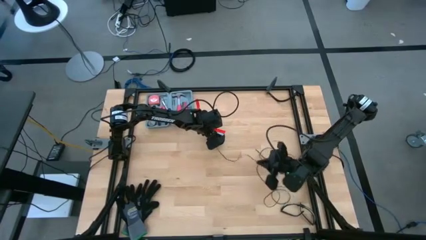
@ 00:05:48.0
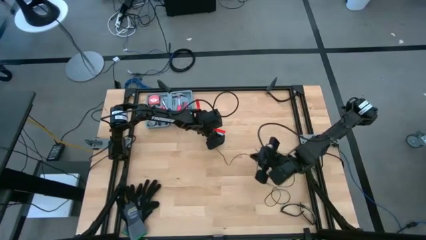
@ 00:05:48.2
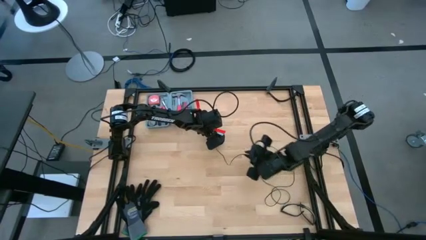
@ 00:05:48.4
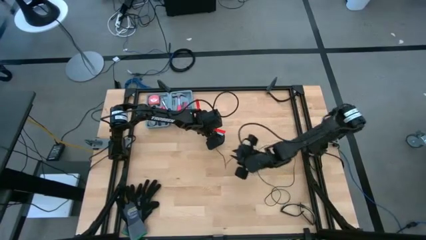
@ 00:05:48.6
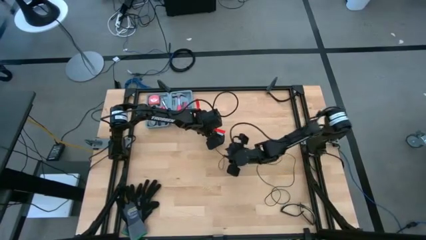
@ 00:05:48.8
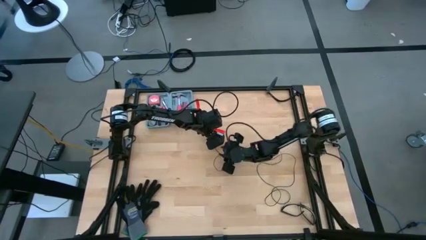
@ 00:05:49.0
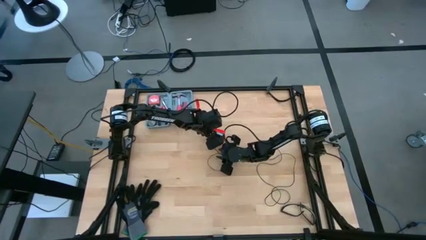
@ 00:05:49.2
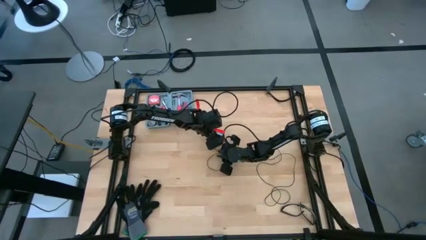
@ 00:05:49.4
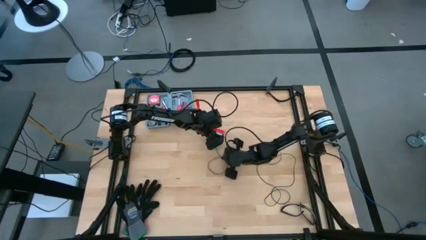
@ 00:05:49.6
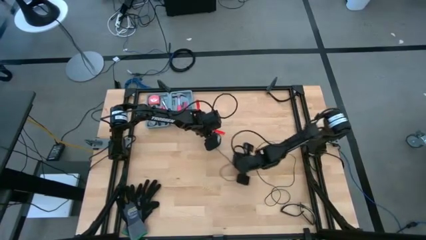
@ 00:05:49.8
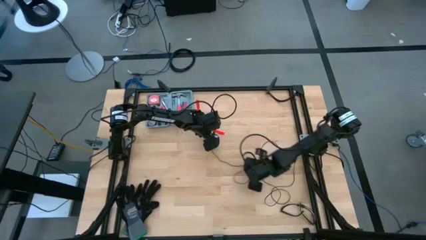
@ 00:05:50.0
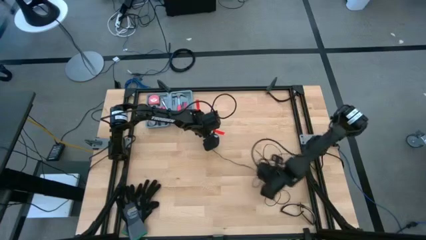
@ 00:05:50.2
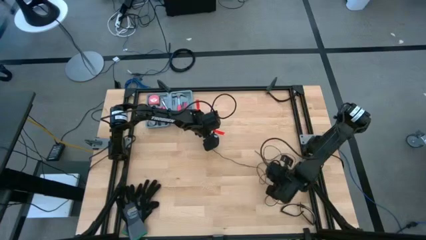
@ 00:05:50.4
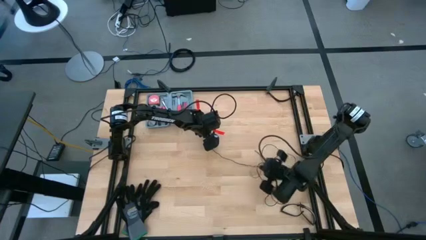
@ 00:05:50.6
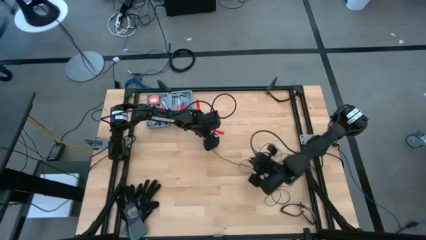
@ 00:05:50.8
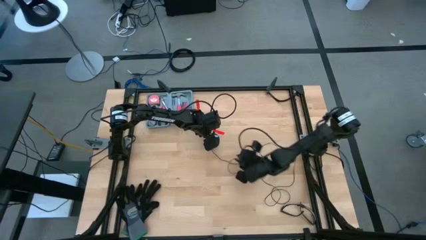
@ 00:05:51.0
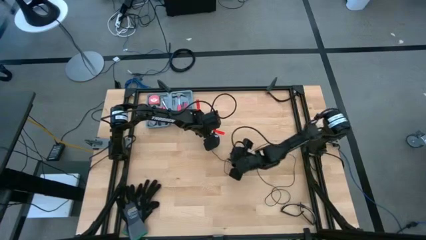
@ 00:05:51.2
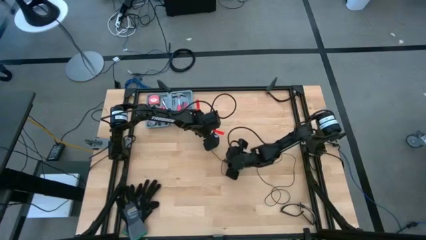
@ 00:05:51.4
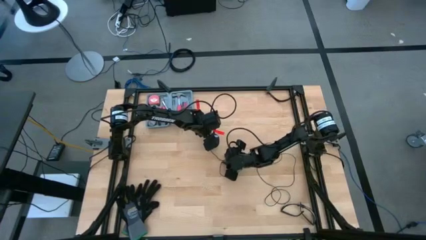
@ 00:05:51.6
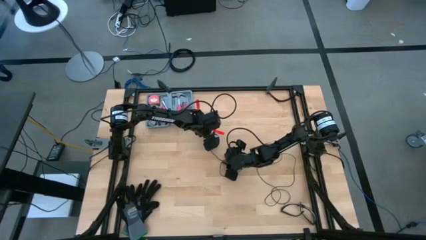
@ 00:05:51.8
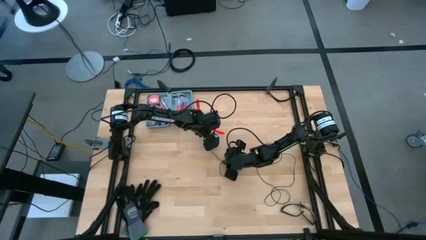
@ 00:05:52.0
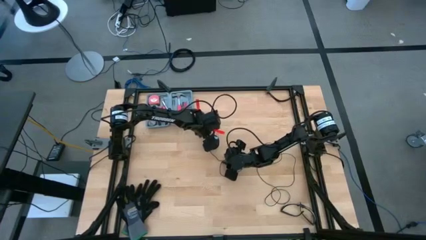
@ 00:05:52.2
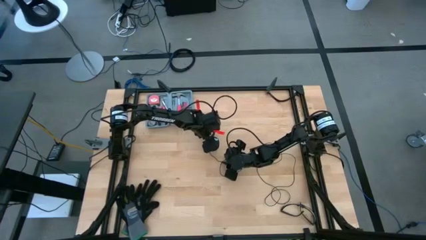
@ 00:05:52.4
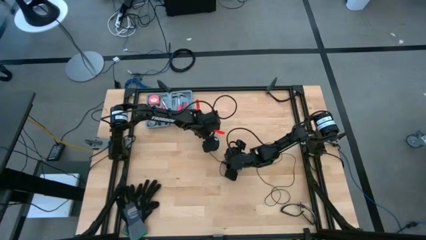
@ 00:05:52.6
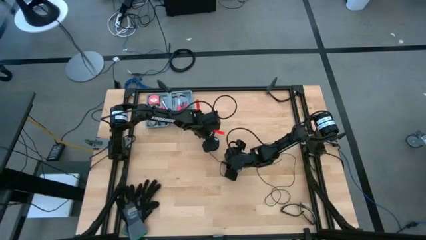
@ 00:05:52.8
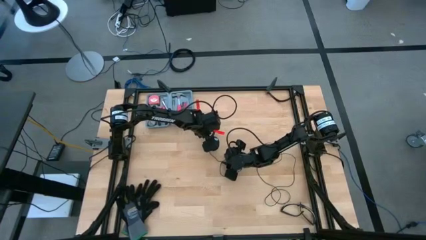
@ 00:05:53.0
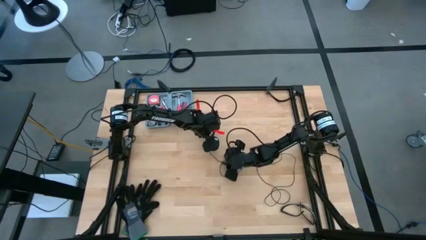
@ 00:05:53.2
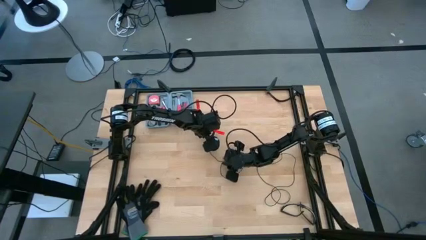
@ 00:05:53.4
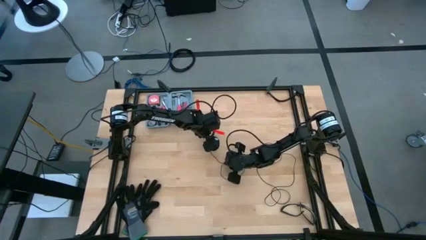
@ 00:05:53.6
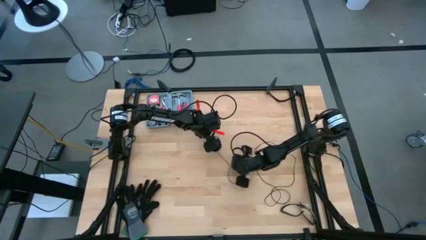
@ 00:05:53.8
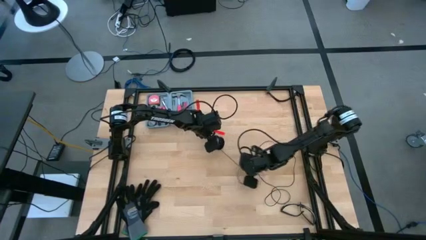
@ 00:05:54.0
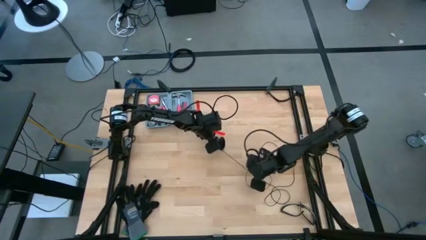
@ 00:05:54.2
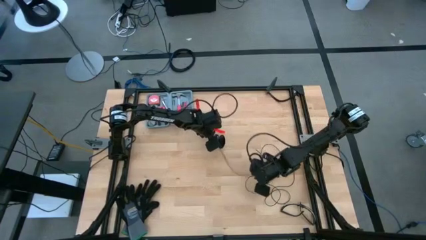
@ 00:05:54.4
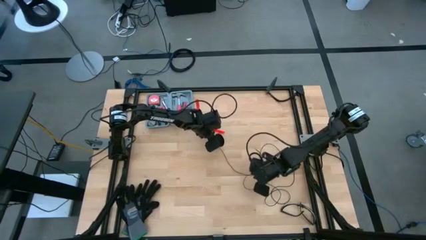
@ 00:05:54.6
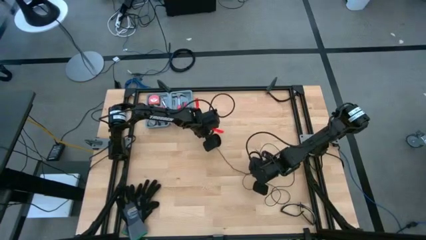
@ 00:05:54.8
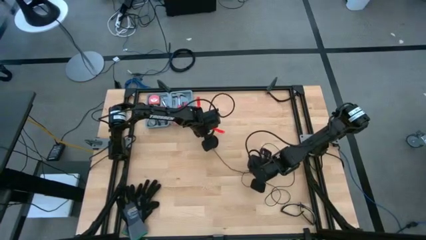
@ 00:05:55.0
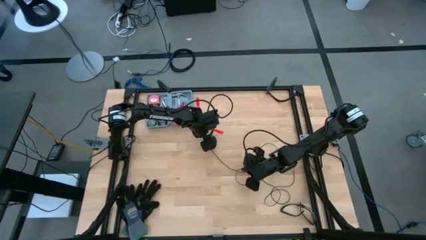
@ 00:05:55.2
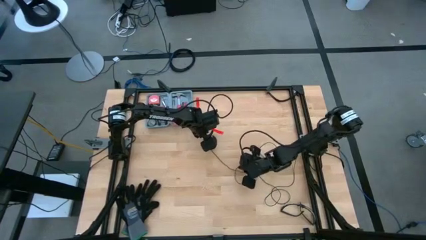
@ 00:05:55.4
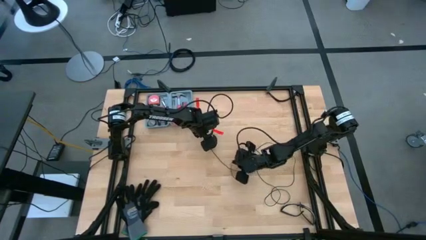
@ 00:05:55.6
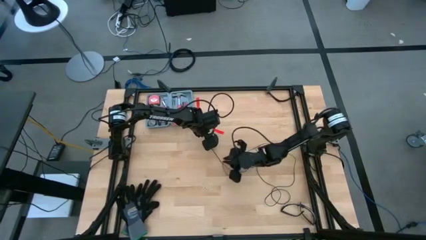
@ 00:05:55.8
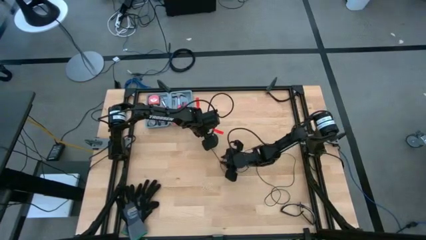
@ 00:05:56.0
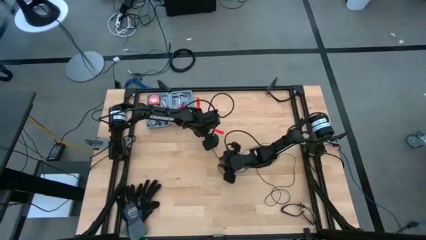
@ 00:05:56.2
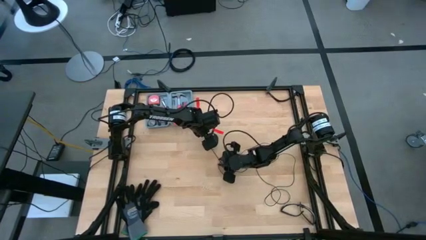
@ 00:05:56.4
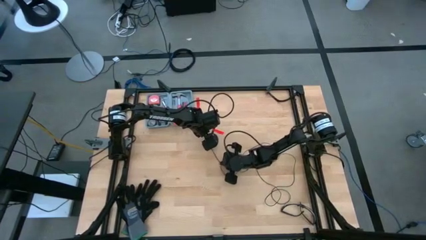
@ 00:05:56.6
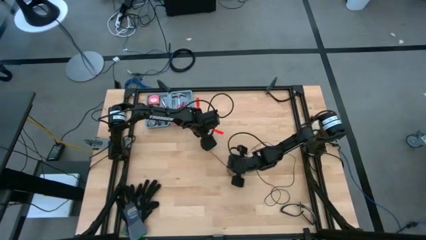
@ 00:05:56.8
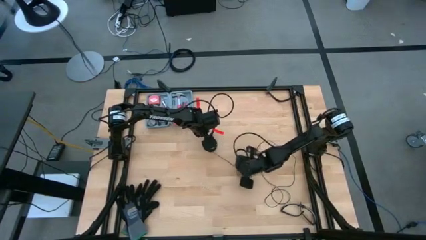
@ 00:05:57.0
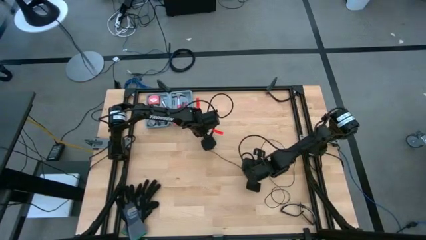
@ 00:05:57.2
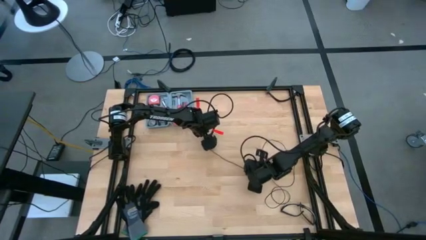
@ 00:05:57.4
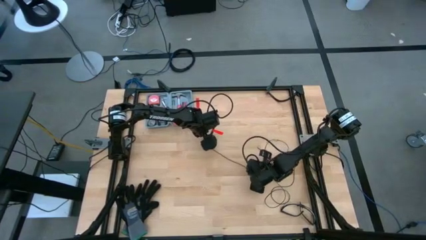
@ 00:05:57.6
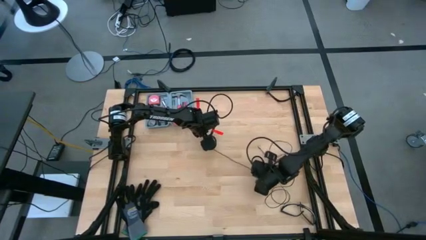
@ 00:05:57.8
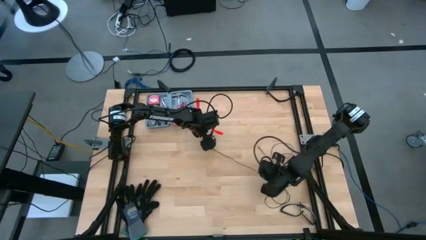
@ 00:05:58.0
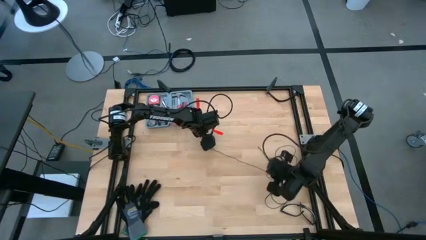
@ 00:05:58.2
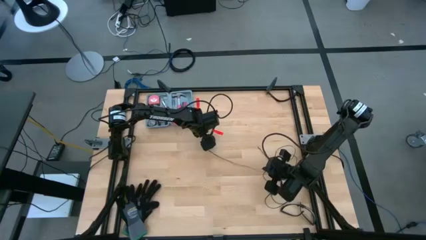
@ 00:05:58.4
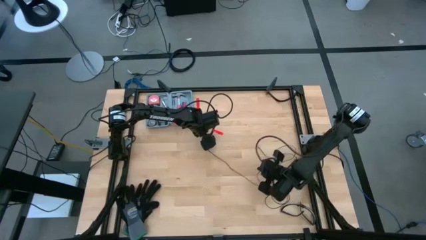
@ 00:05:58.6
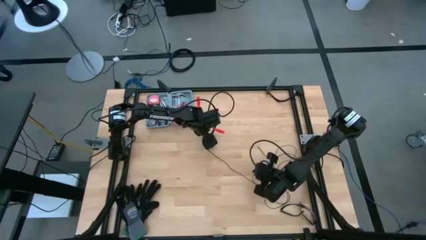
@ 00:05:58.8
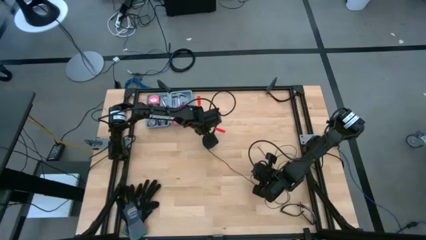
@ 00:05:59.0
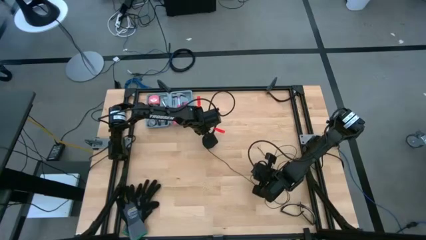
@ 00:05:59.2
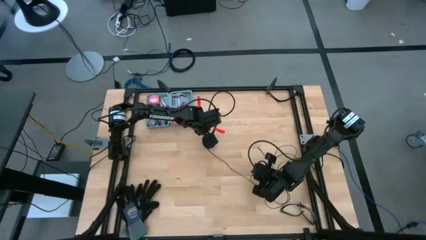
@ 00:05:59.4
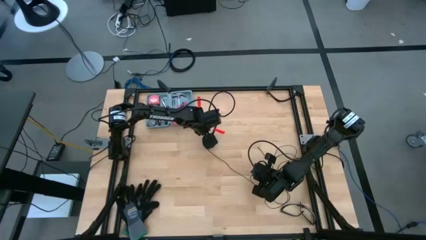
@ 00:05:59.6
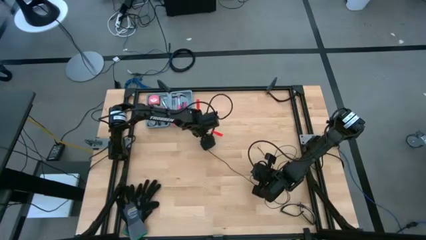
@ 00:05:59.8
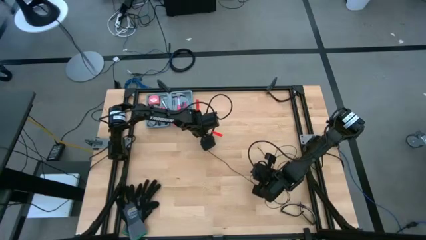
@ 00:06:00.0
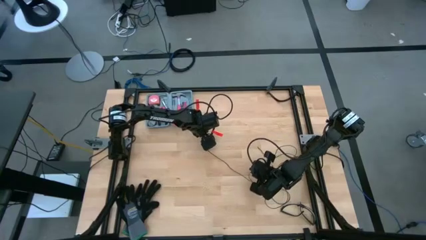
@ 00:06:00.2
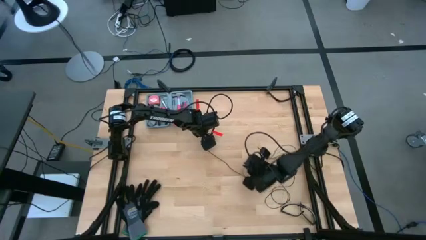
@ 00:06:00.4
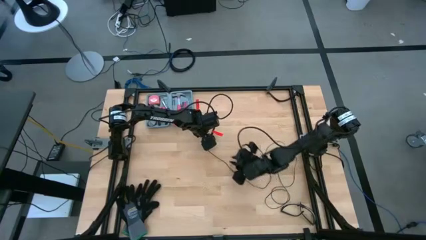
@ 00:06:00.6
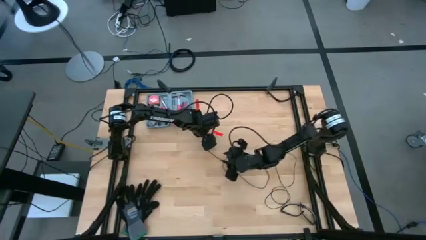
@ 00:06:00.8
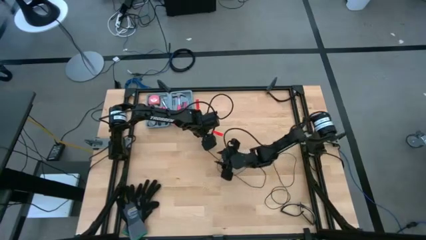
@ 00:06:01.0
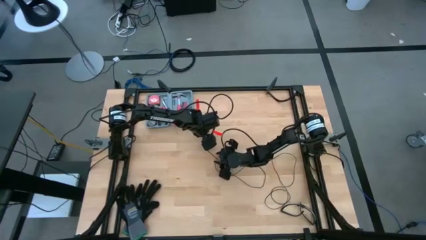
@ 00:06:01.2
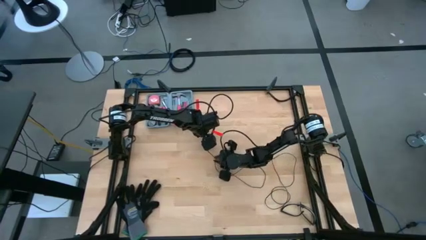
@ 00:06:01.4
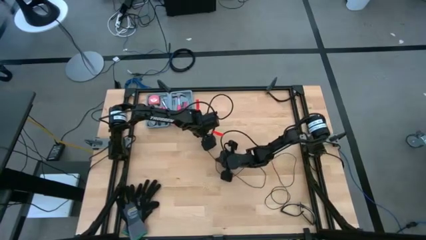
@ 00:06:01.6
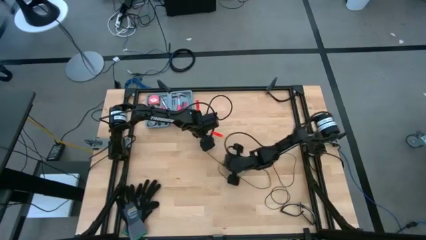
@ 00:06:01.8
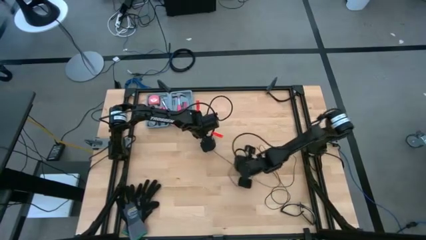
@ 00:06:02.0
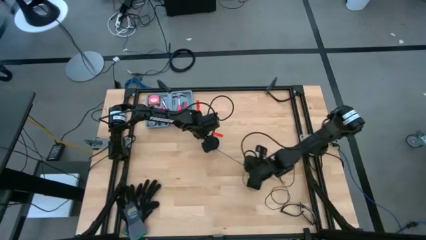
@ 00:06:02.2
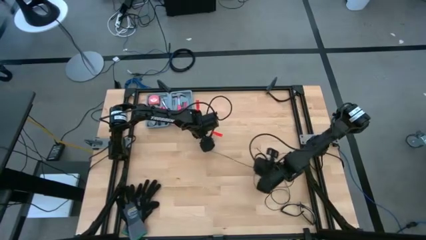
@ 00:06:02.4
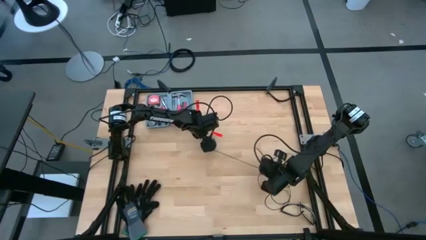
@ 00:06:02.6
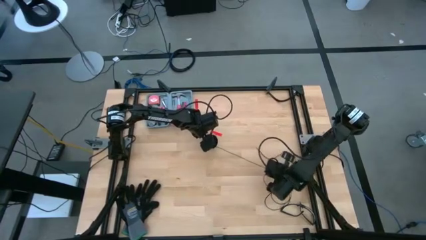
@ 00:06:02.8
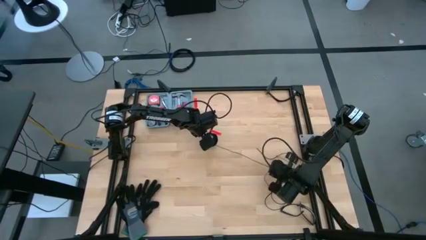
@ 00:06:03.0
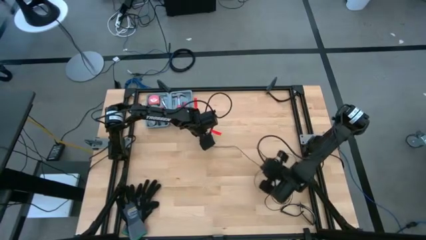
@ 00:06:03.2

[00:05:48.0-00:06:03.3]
Task: Coil cords
Uncoil the black wire from the spool
